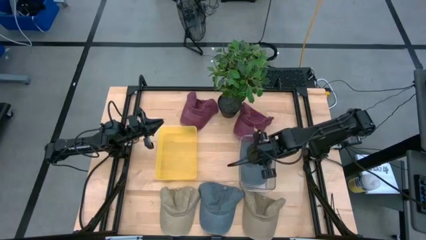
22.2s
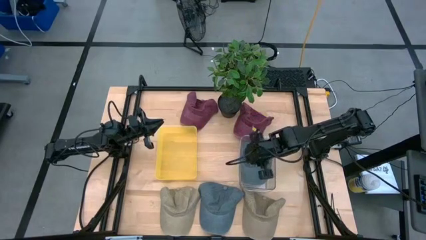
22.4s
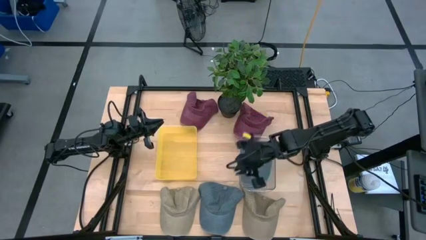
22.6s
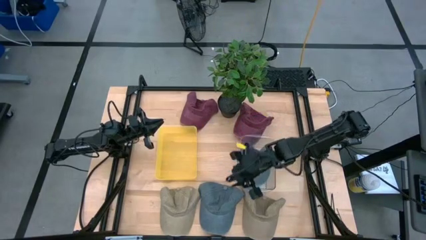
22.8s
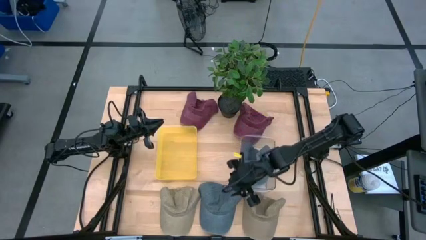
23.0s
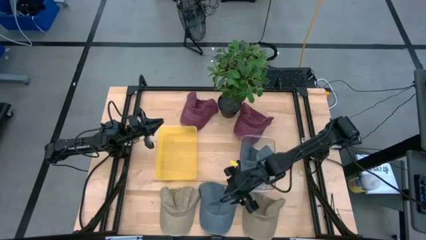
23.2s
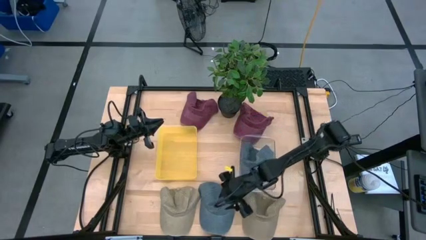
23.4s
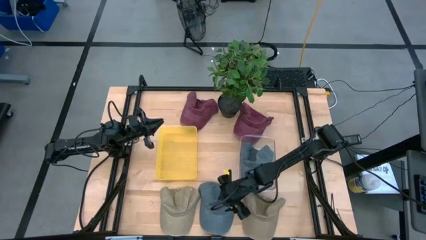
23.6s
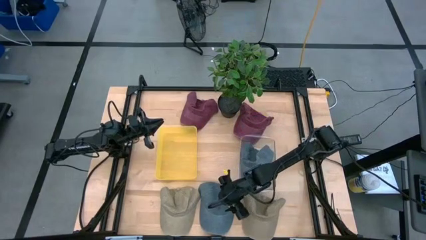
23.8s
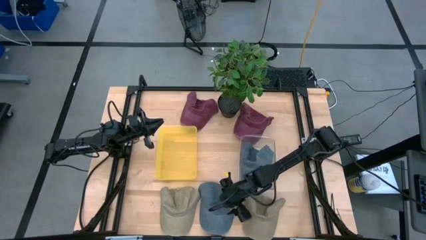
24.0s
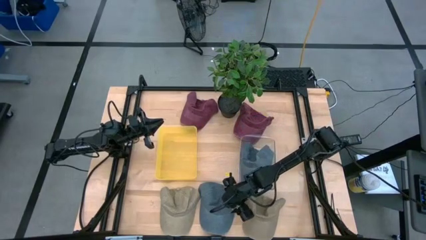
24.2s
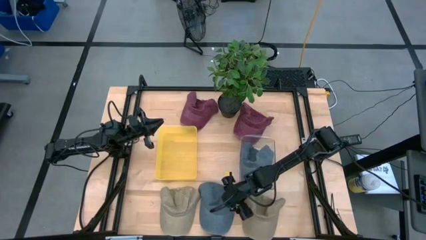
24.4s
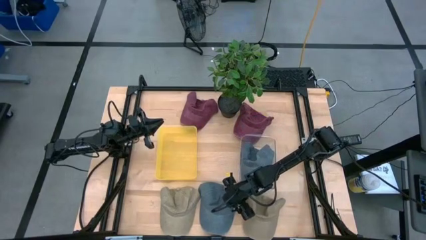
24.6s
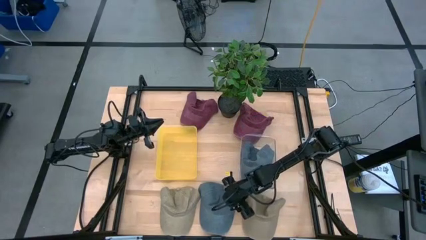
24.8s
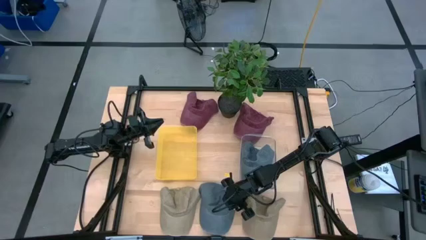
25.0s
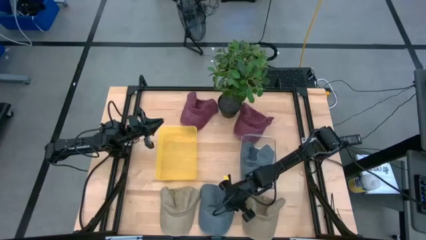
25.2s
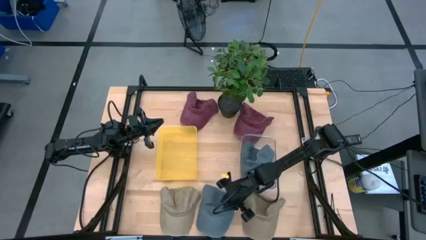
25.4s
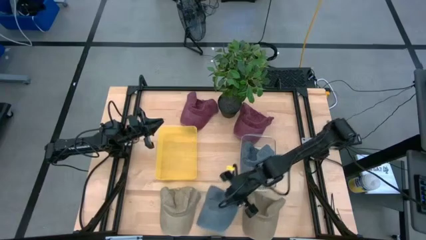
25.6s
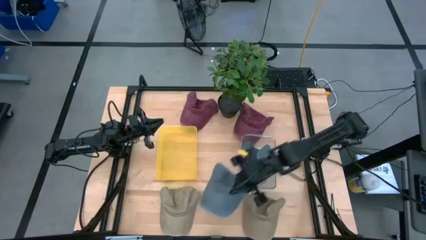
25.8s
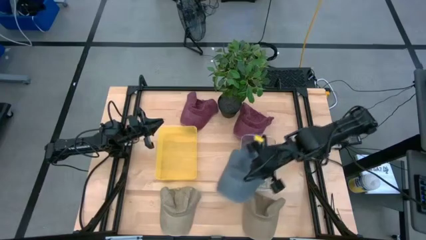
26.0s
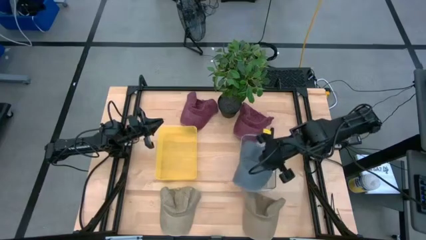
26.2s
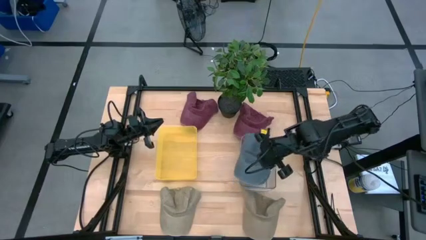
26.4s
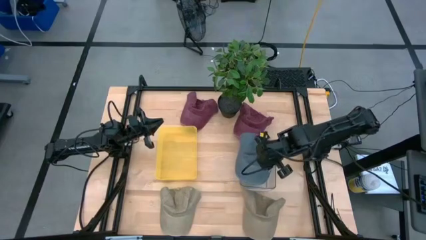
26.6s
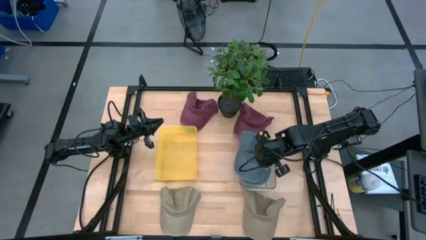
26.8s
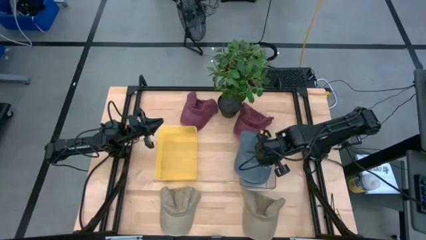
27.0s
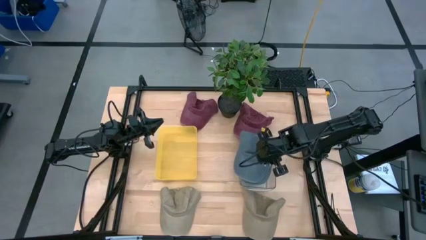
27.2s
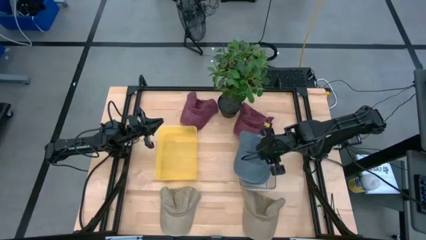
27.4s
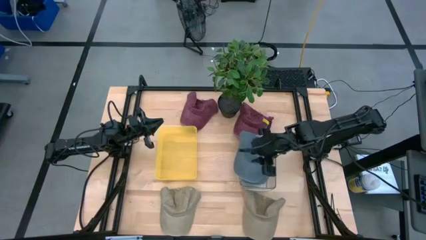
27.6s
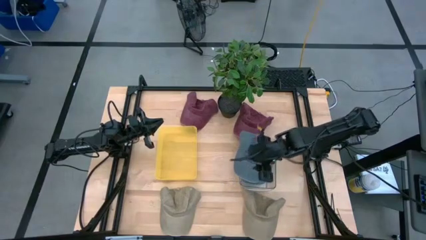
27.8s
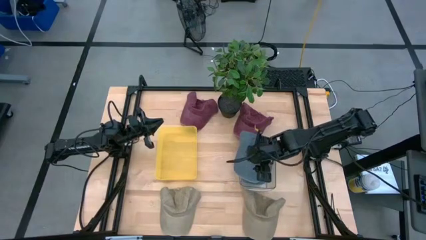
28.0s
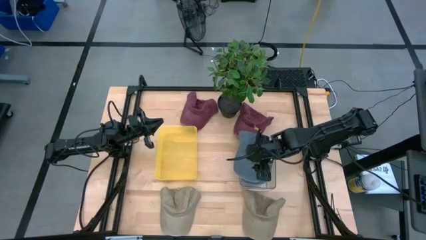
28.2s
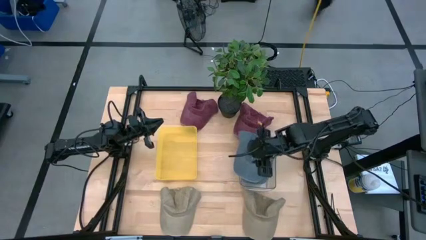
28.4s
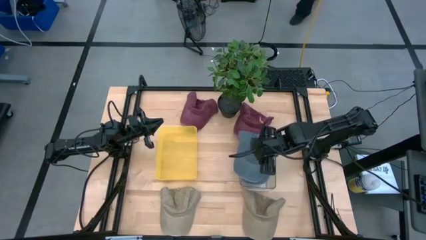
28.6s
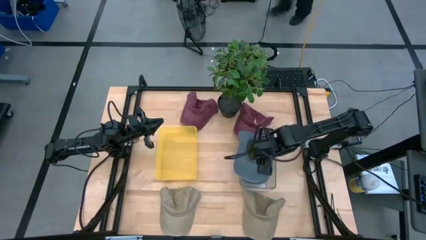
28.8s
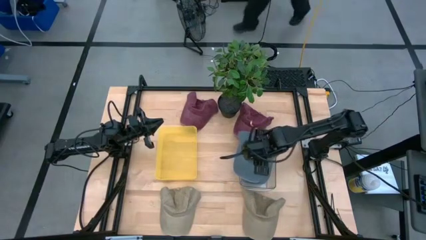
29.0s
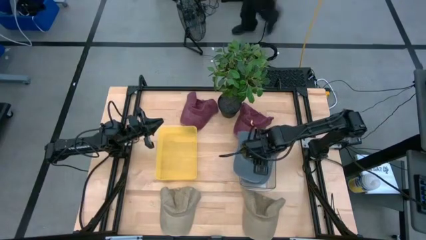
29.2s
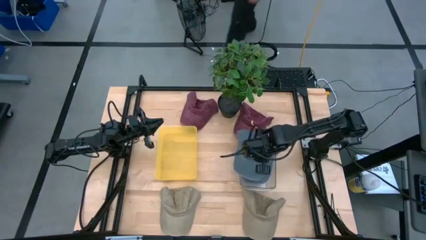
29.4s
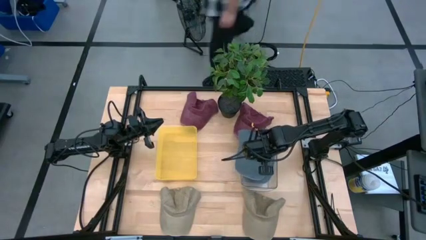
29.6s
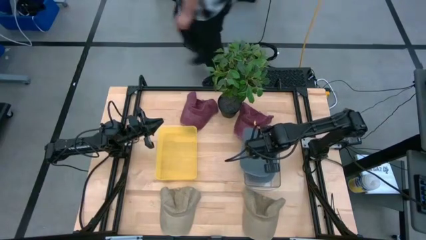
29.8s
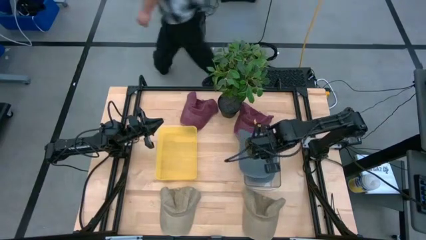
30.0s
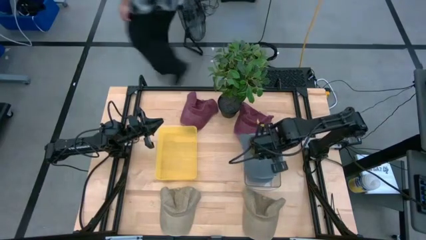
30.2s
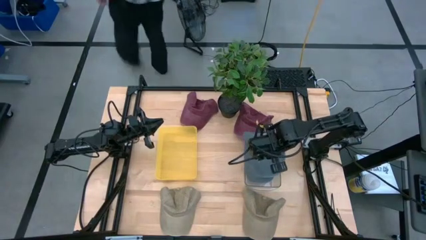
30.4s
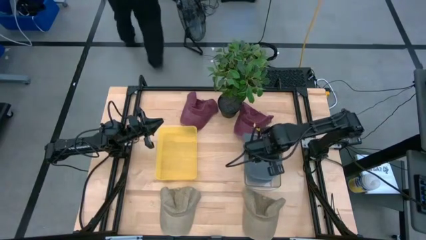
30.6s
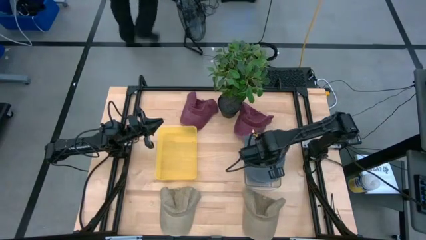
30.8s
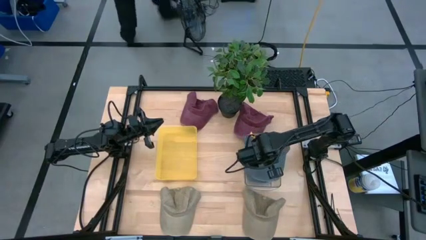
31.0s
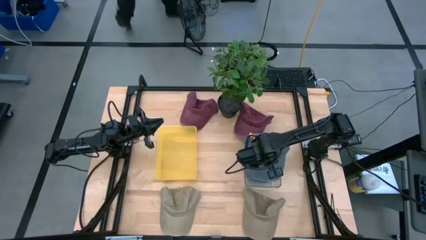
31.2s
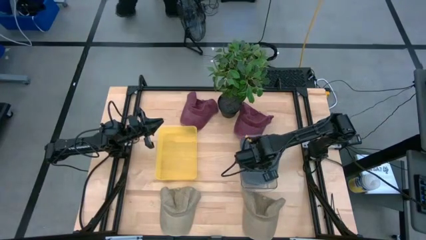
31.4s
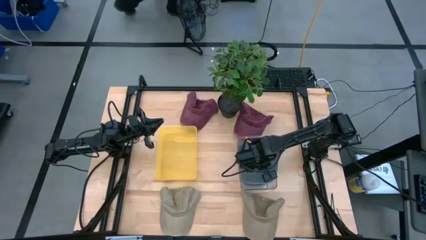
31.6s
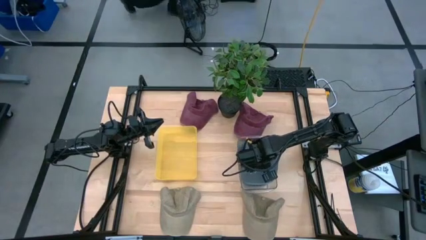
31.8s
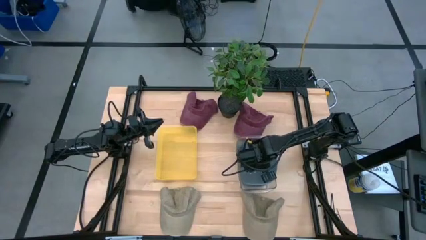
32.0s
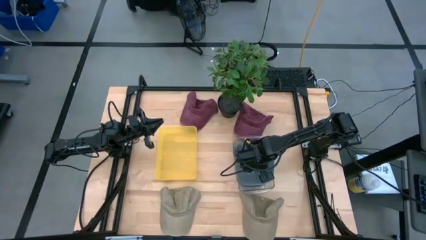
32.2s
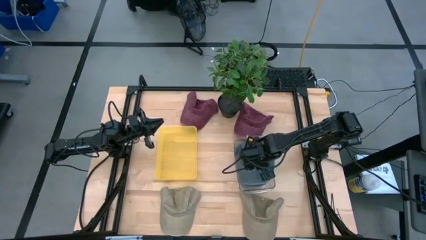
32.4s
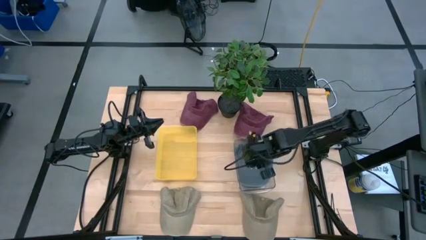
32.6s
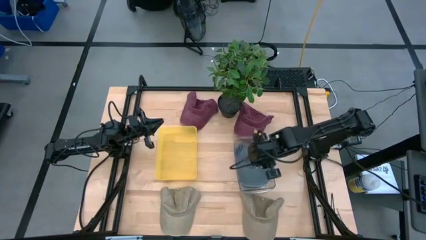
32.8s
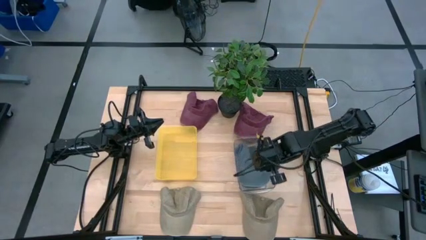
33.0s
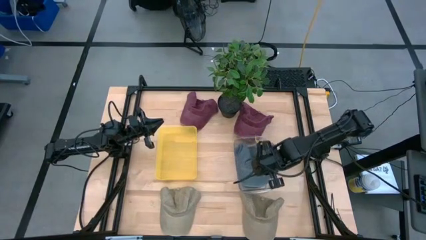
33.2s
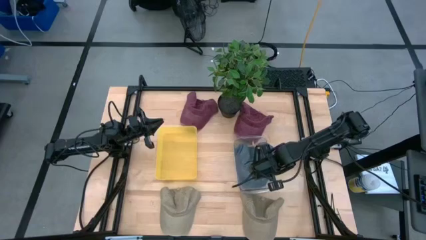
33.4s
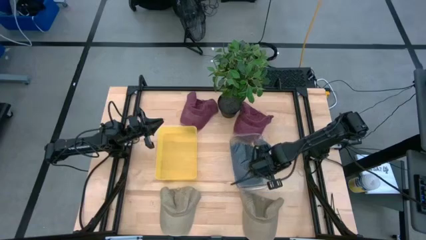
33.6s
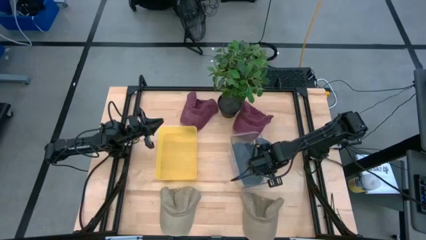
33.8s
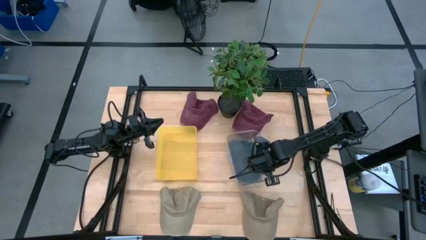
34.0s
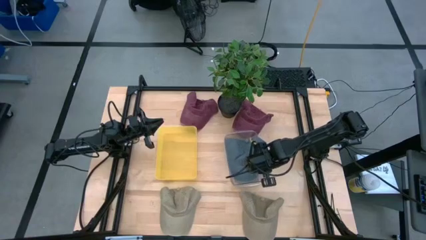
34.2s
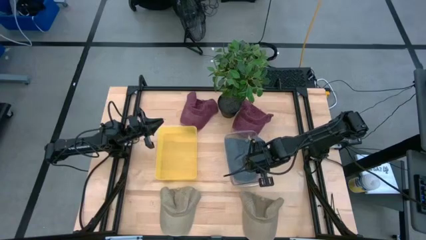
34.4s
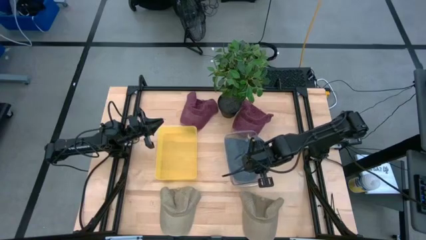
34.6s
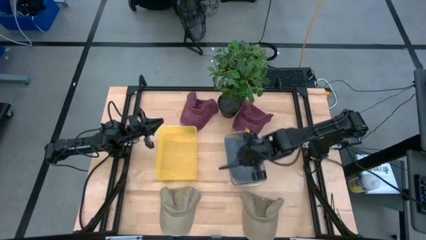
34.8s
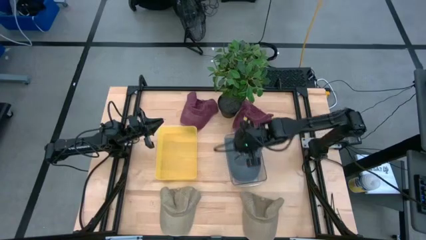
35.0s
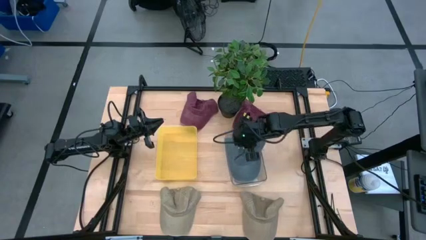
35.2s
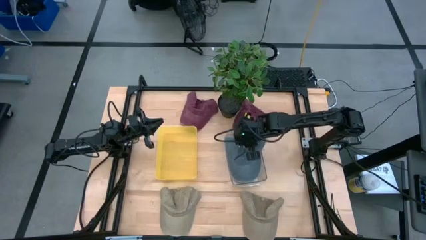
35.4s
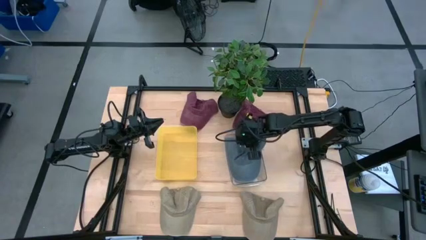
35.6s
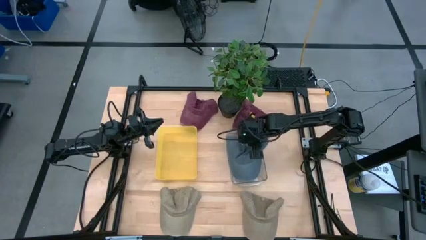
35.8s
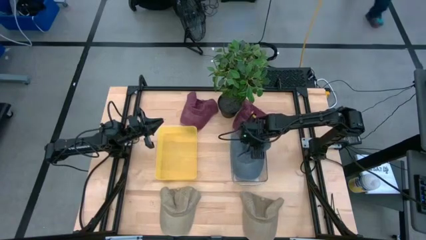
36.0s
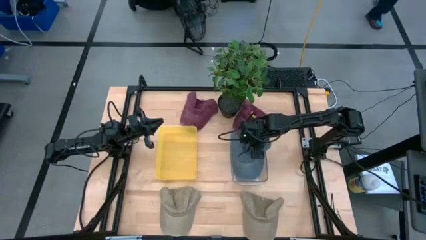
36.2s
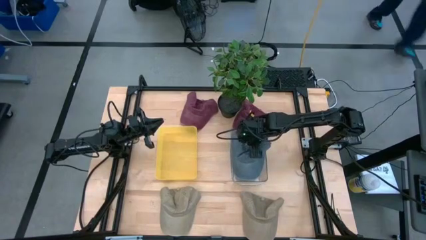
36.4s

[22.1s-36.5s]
Task: Pick & Place hat
Put the blue cap into the transparent bin

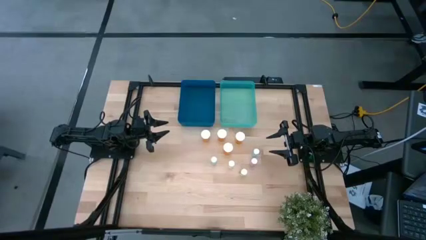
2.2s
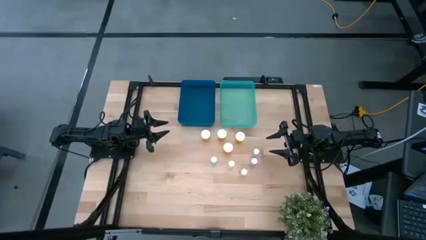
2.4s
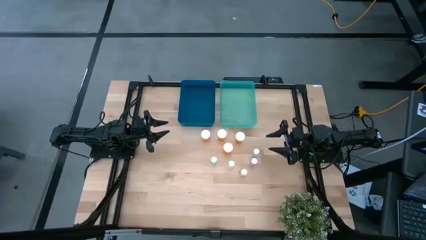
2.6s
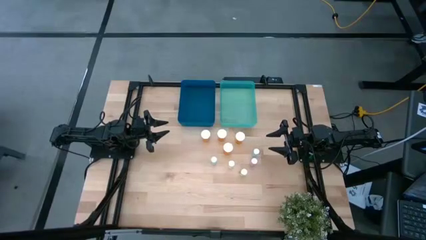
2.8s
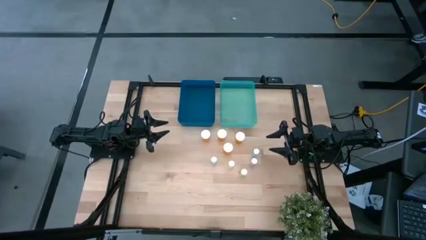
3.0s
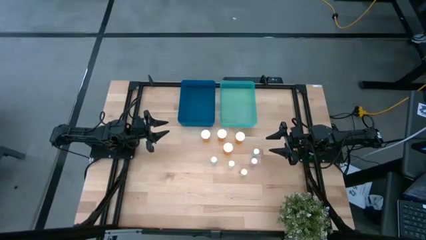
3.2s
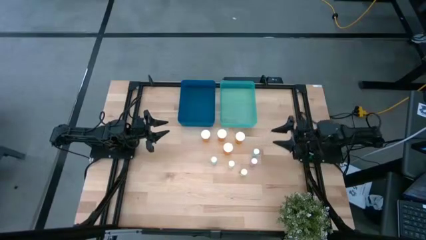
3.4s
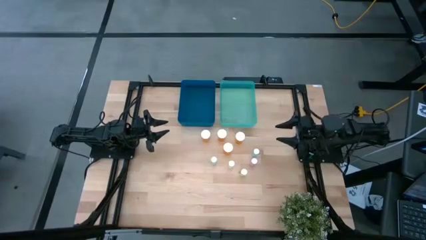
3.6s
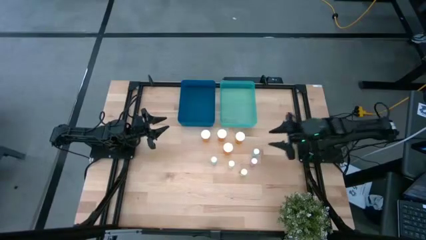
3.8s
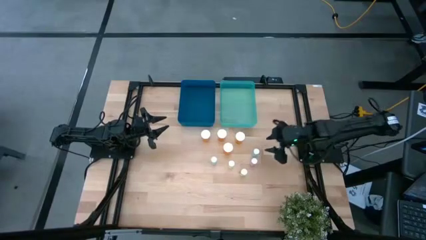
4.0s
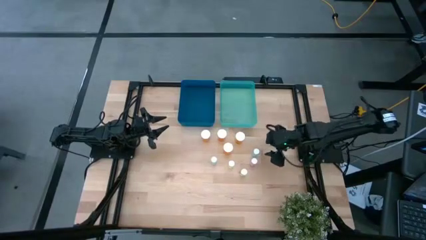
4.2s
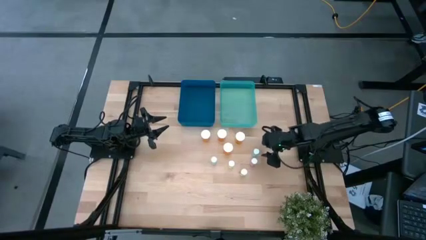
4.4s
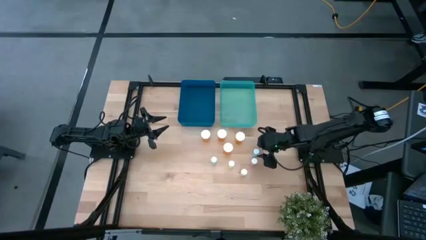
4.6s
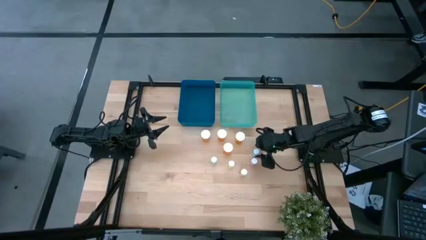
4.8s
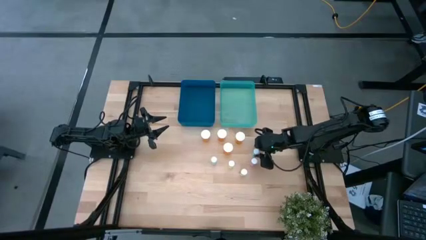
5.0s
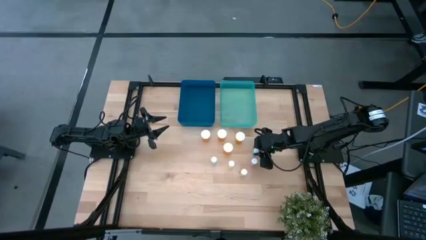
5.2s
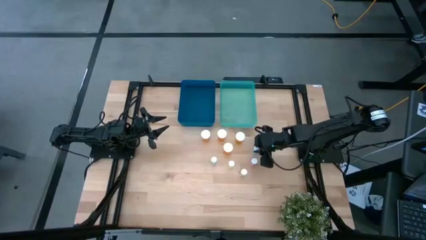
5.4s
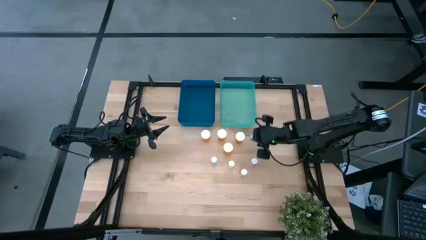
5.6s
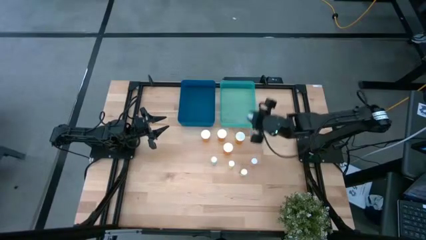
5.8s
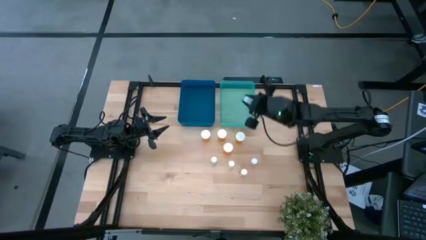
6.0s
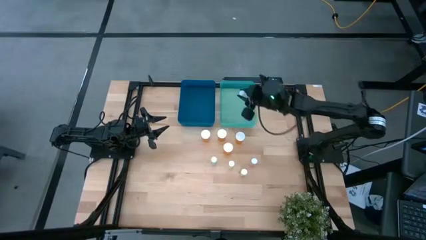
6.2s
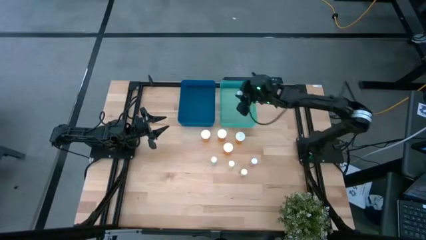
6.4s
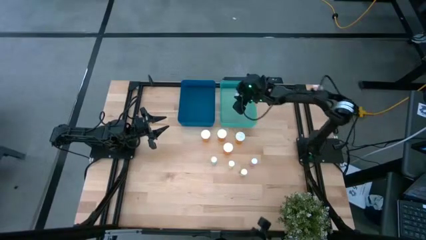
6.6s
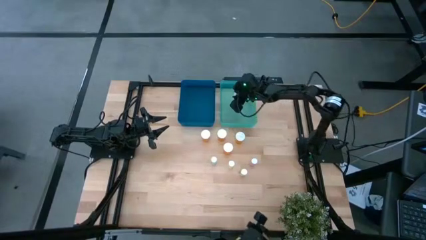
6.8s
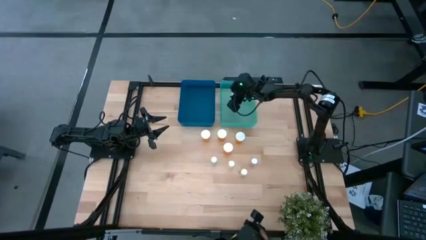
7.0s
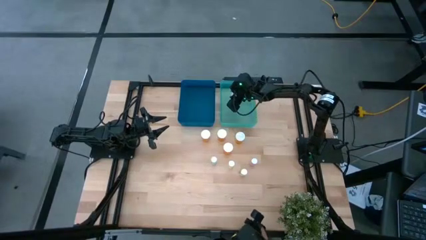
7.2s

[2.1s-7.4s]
Task: Pick and place medicine bottles into bin by pill shape (circle, oval)
Put the blue tablet bottle into the light blue bin
